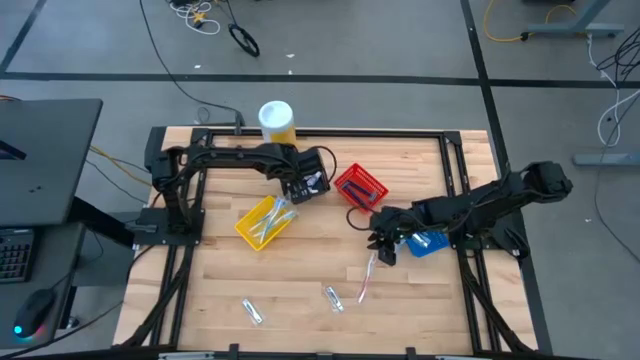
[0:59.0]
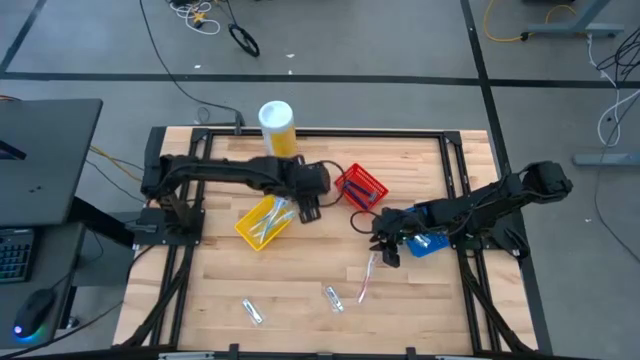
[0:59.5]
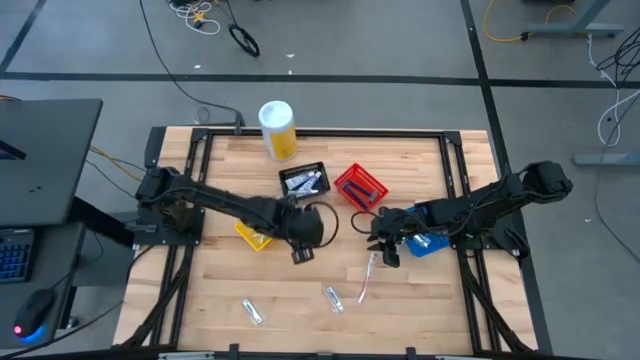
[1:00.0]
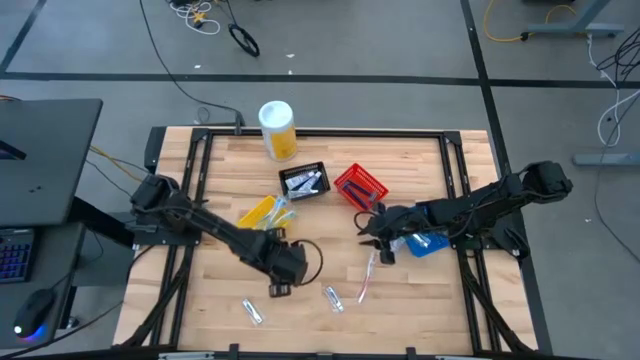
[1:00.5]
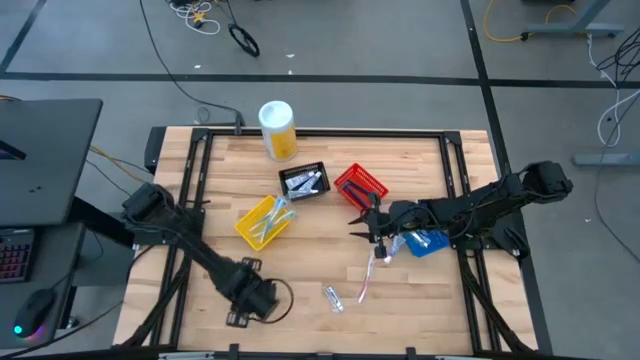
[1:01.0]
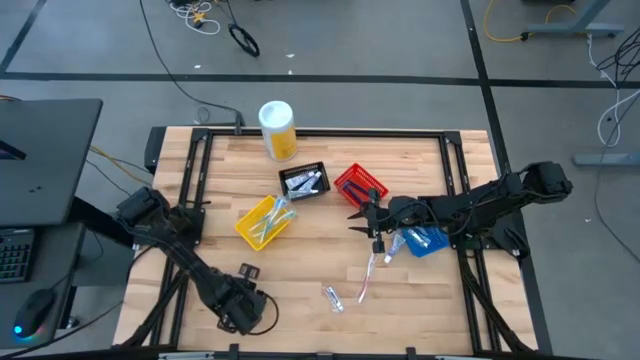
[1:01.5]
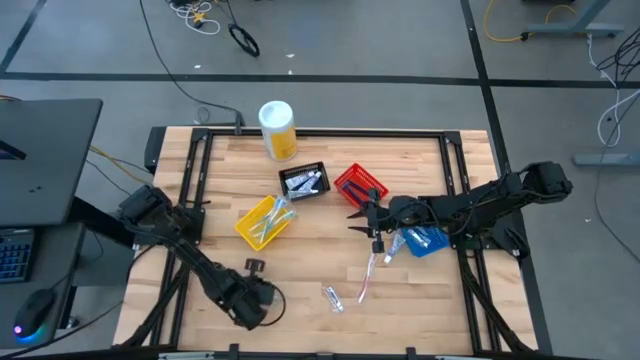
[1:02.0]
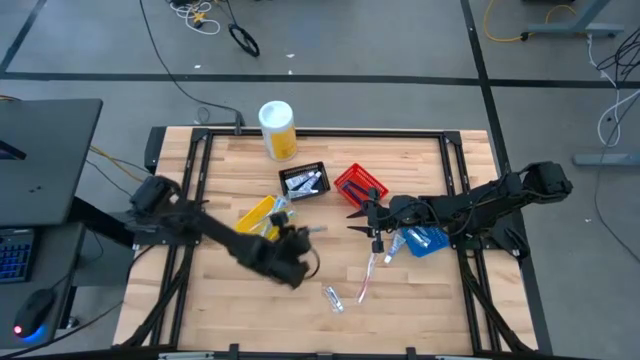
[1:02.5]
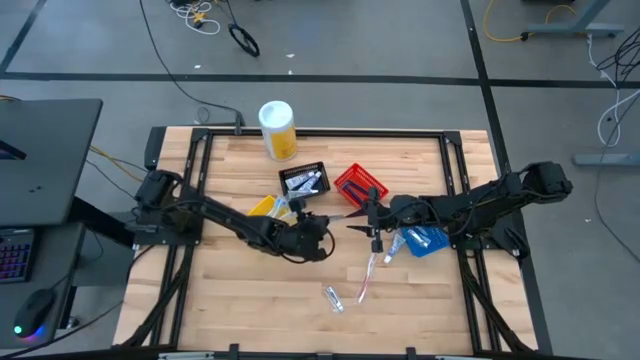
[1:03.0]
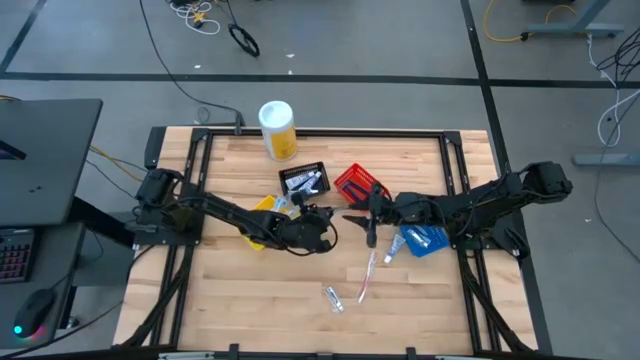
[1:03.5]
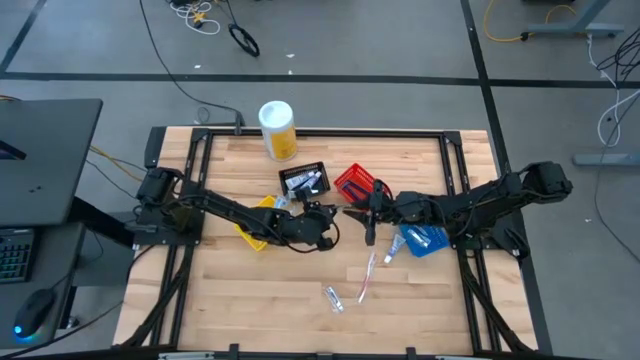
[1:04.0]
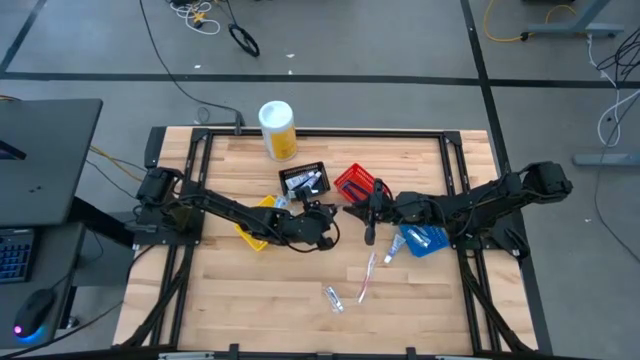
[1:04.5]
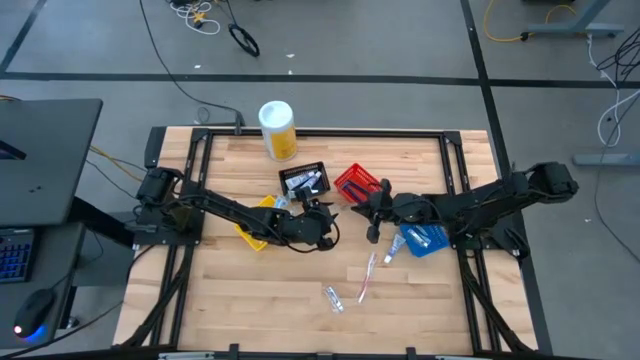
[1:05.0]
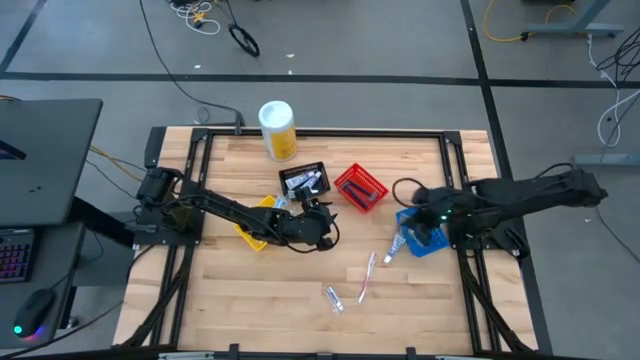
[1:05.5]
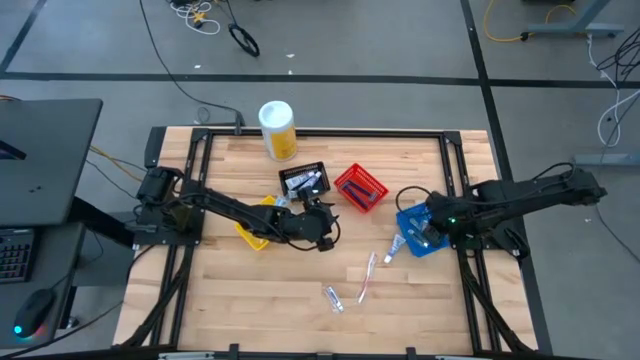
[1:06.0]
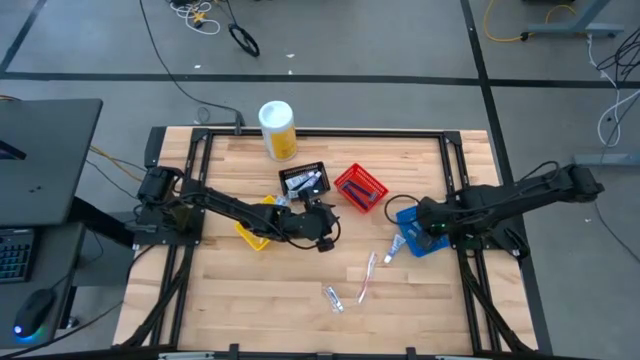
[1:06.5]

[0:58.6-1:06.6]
Task: Pick & Place Travel size toiletries
Put the silver nail cutter into the blue basket

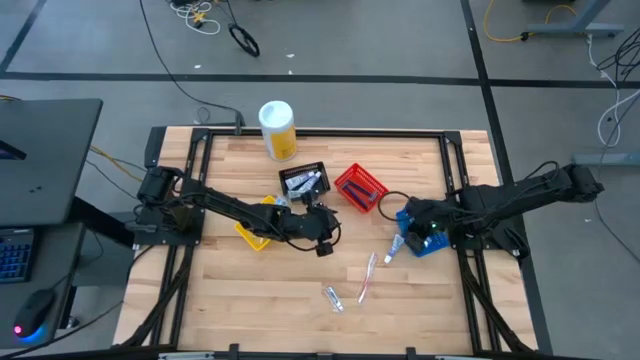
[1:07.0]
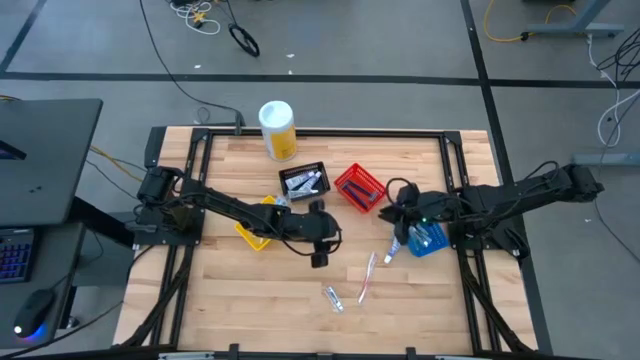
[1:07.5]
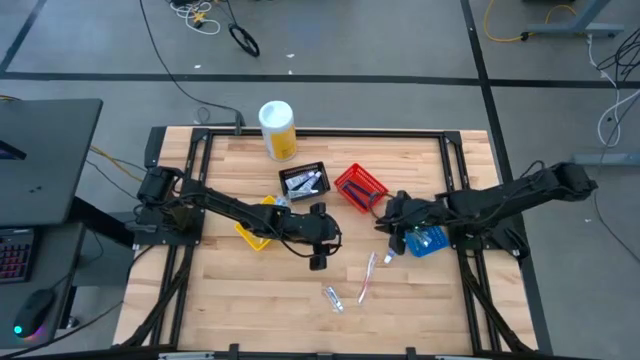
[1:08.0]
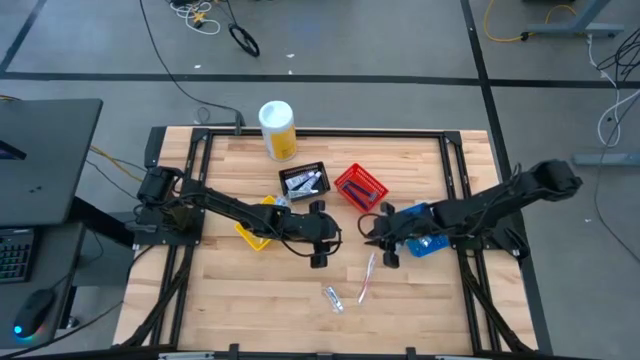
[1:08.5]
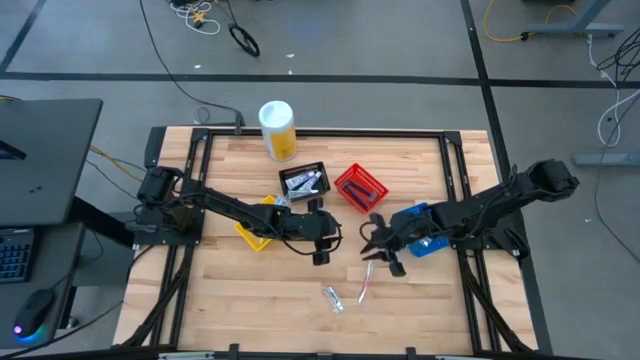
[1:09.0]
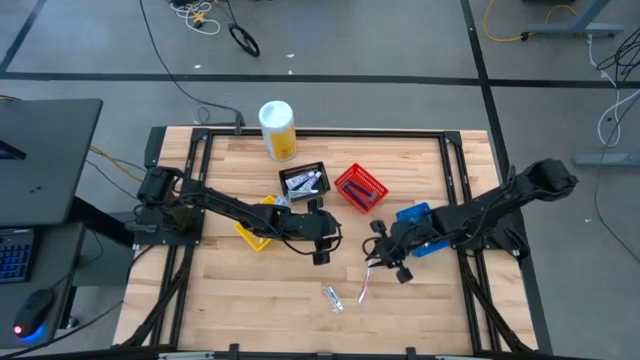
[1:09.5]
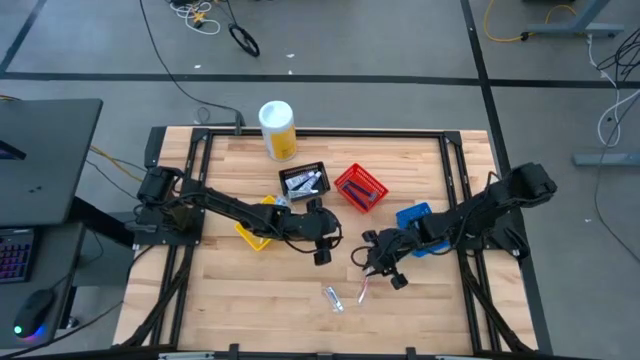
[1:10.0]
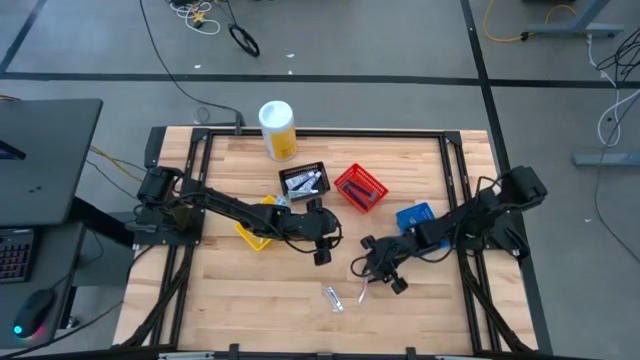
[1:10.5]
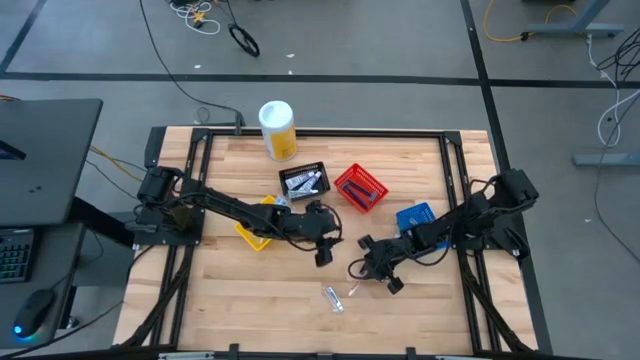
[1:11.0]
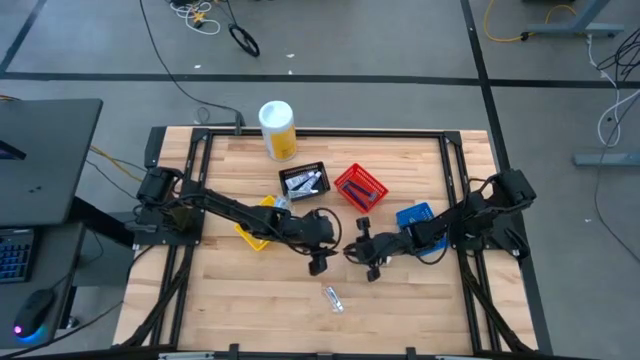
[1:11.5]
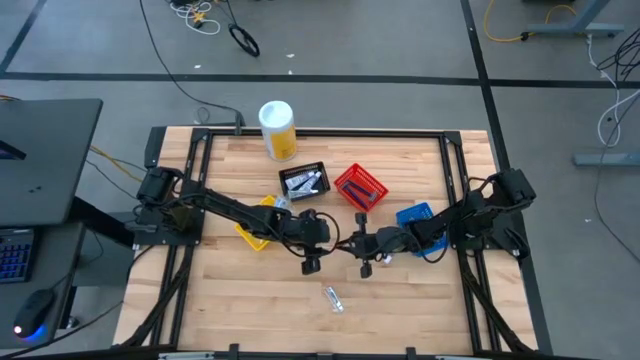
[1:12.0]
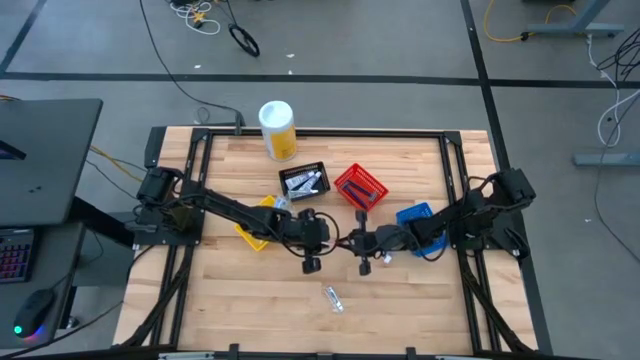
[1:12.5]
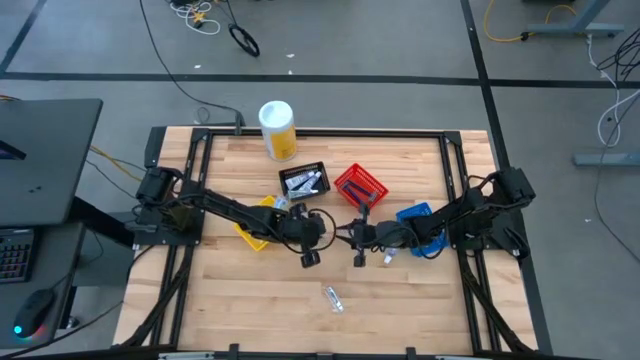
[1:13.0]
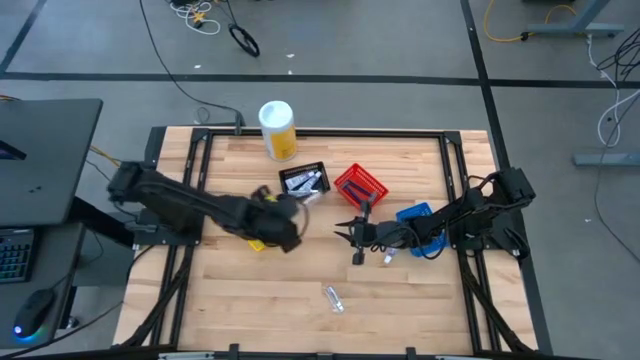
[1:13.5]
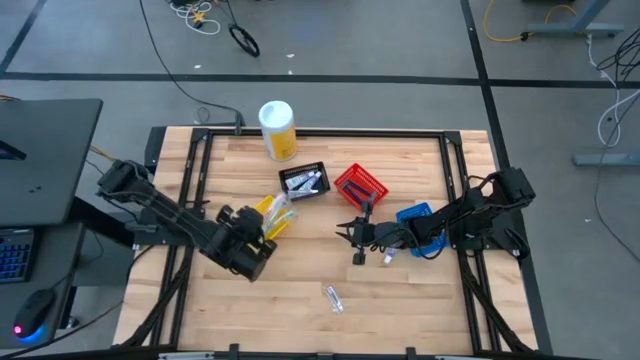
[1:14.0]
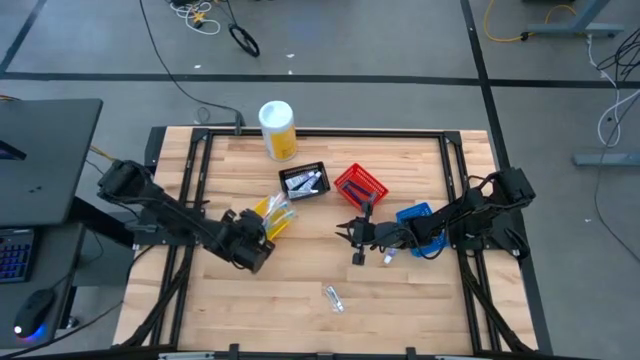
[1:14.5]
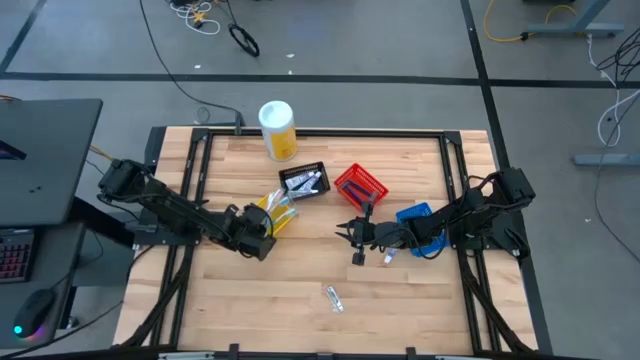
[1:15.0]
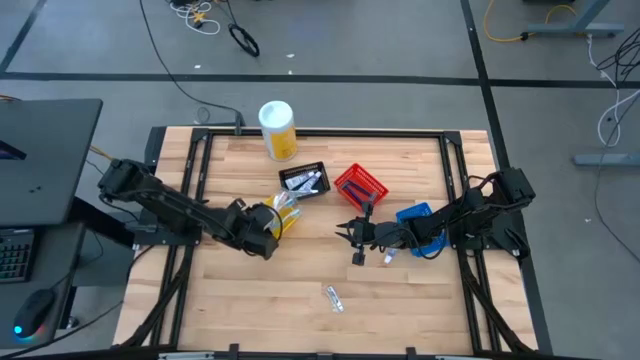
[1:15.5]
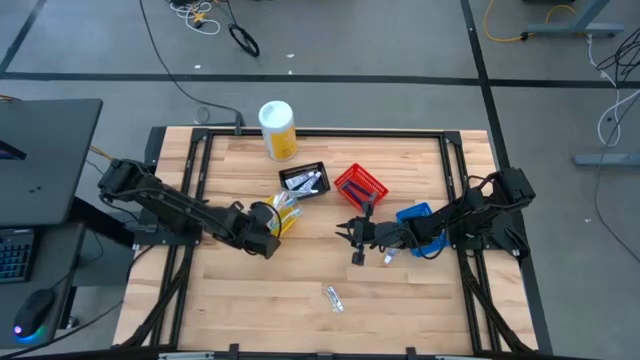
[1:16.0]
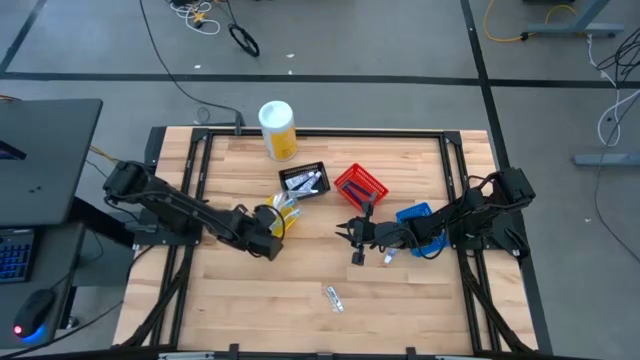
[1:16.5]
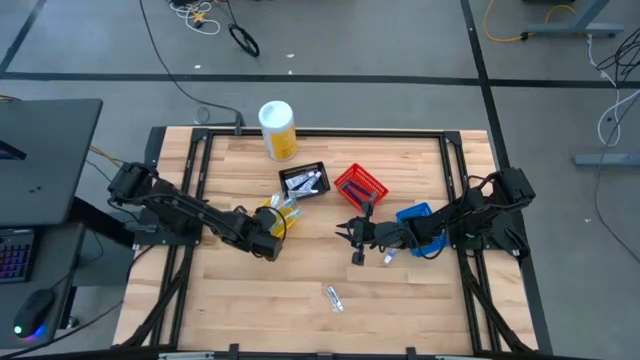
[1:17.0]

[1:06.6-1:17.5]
Put the red toothbrush into the yellow basket

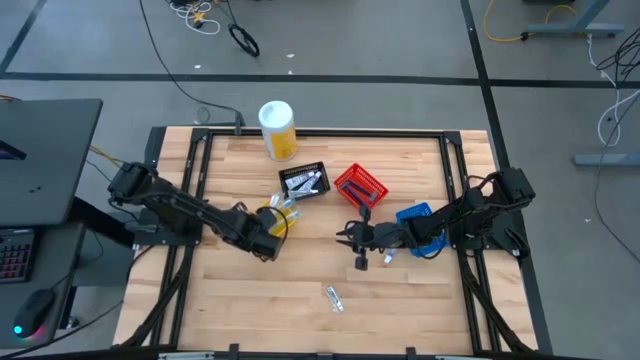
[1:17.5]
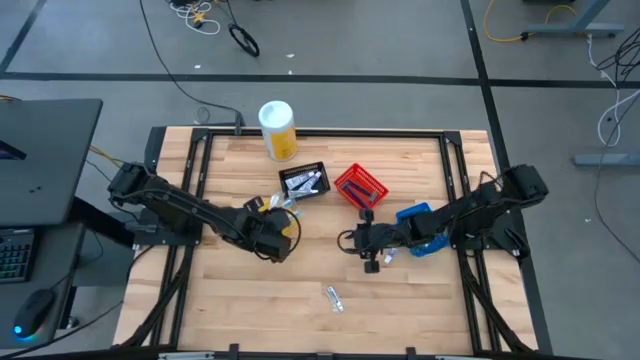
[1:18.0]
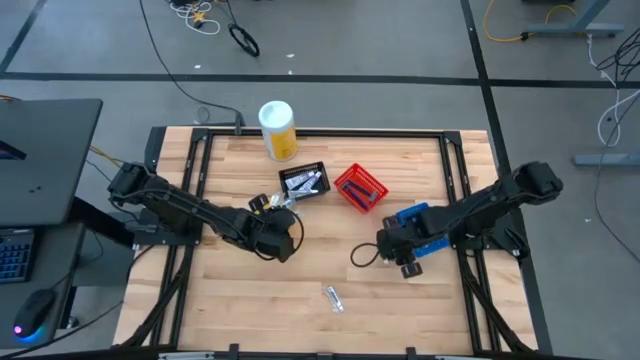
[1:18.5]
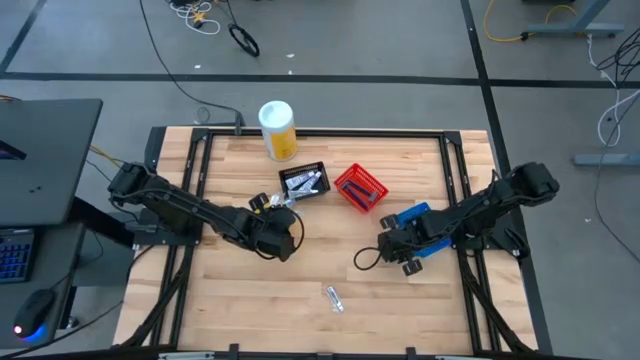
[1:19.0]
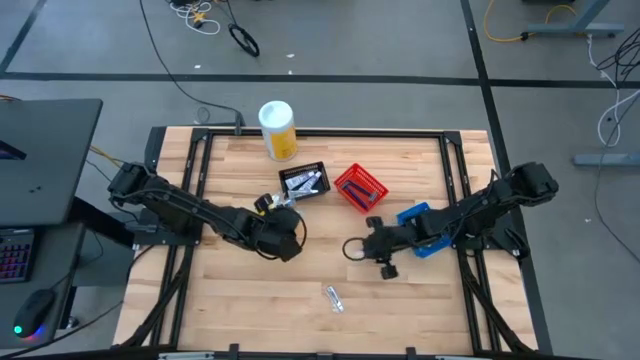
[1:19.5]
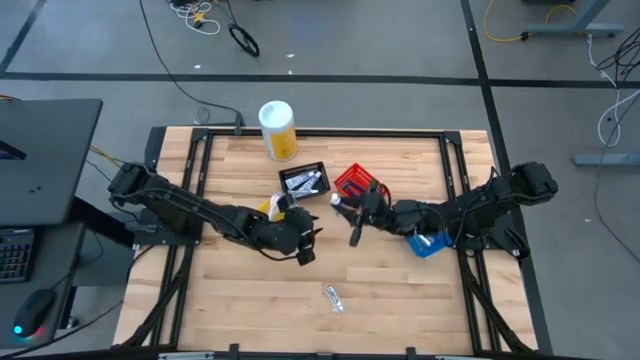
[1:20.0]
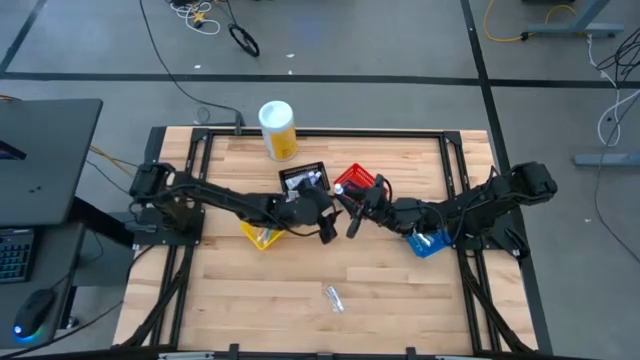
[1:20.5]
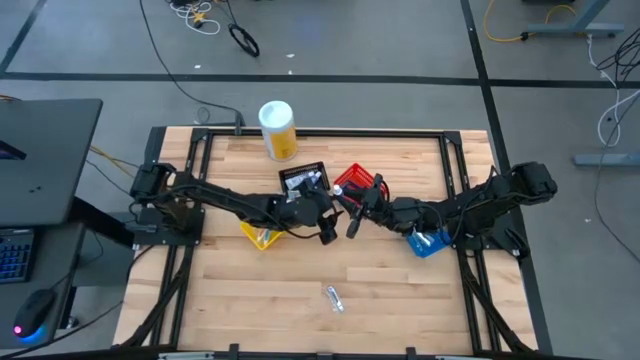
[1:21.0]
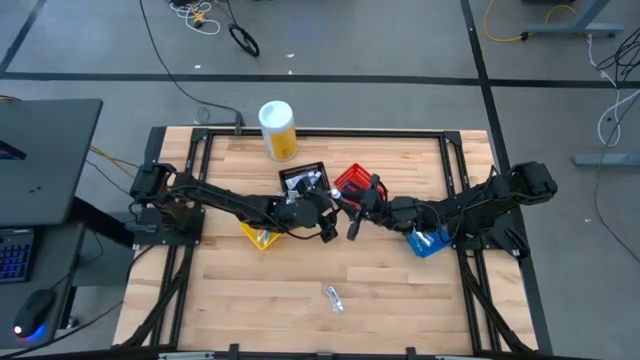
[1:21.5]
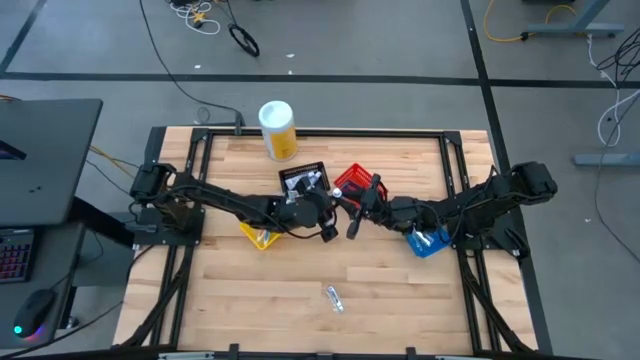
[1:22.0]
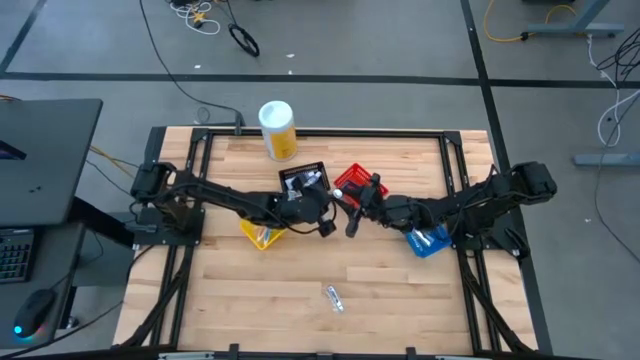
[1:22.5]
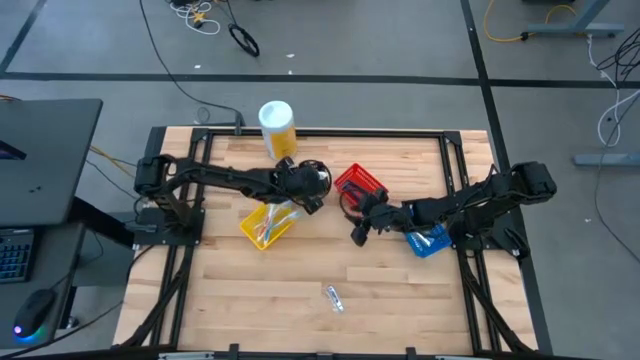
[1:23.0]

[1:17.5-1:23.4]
Put the white toothpaste into the black basket
